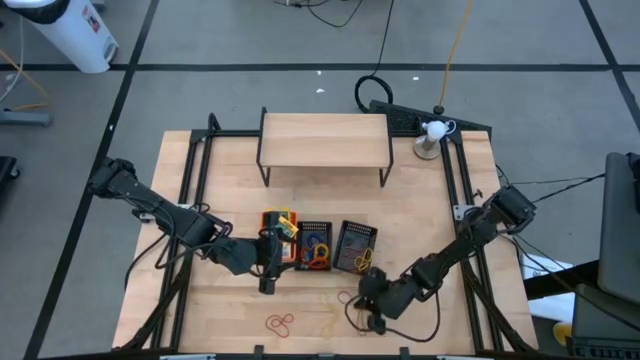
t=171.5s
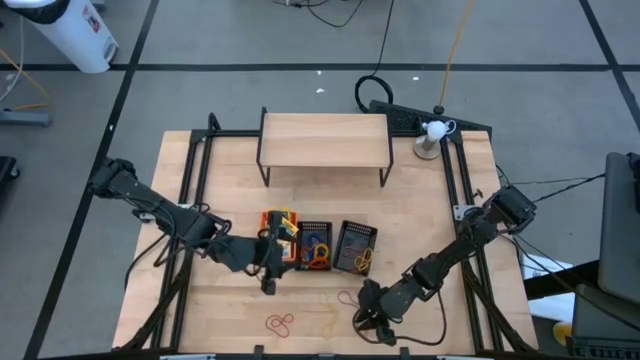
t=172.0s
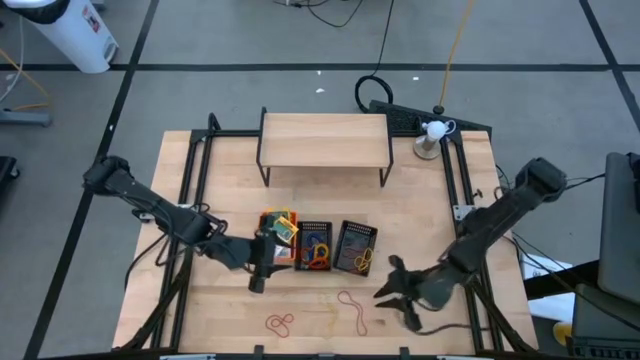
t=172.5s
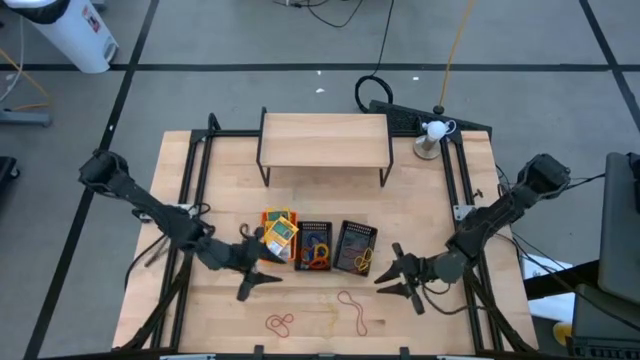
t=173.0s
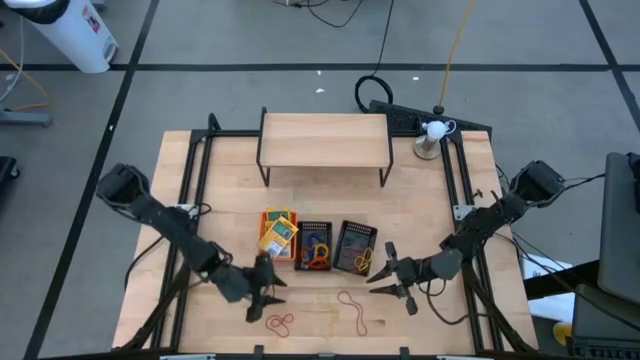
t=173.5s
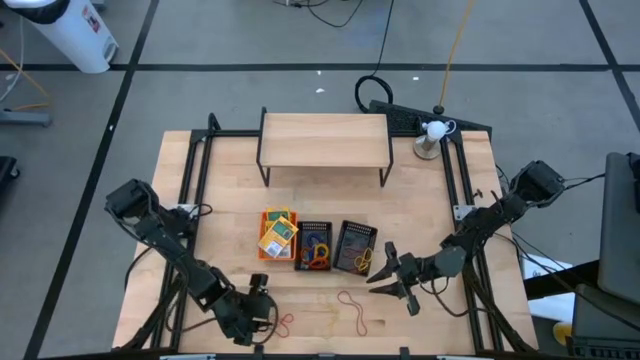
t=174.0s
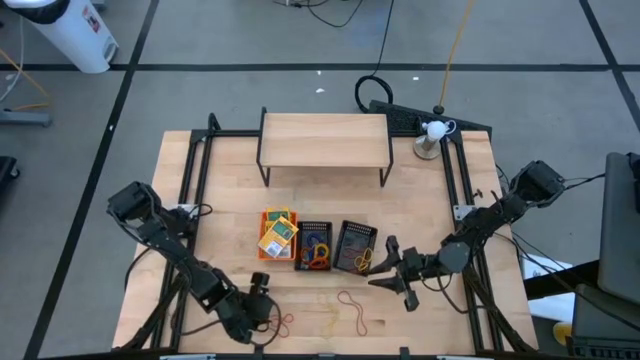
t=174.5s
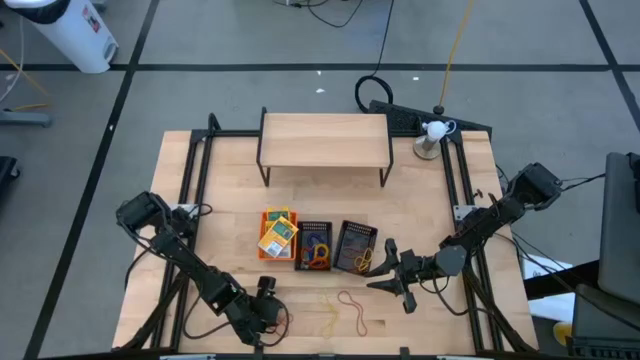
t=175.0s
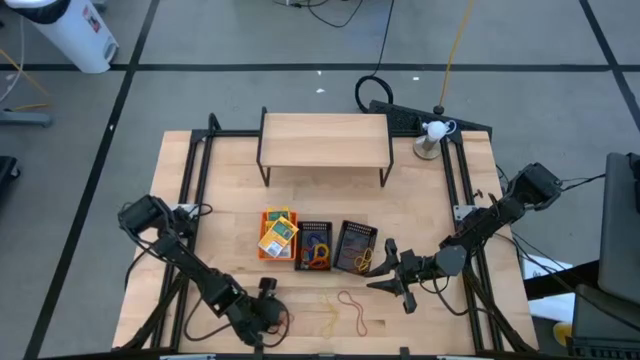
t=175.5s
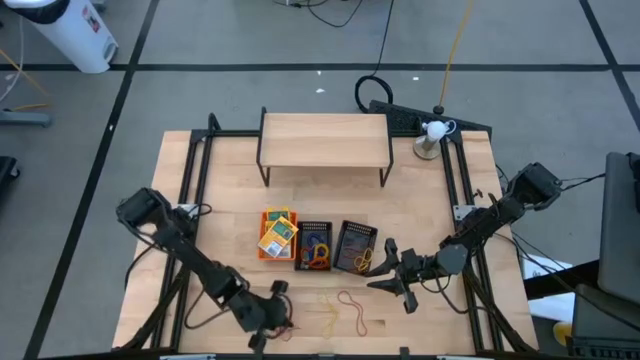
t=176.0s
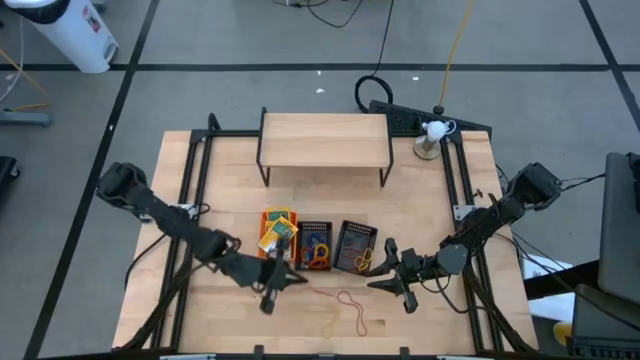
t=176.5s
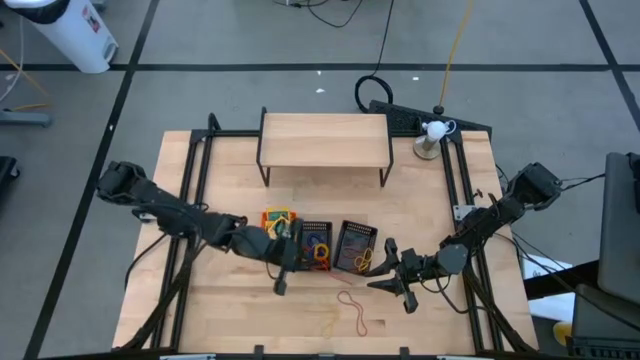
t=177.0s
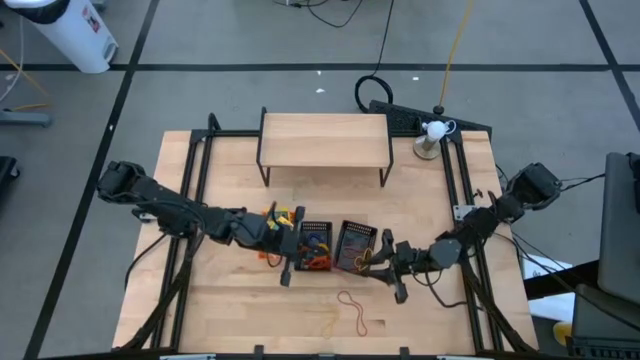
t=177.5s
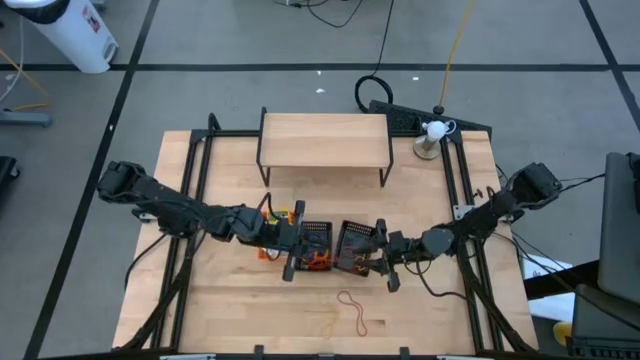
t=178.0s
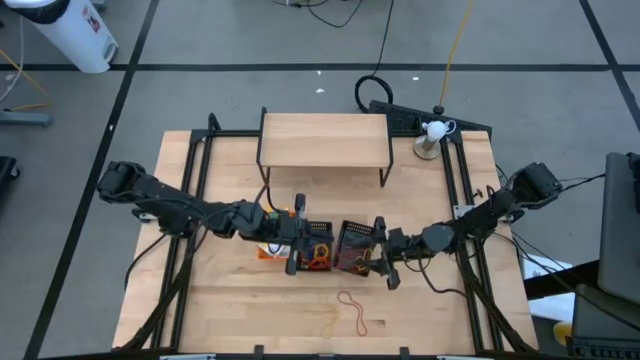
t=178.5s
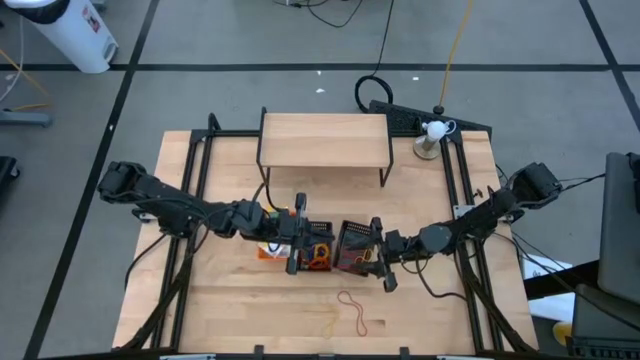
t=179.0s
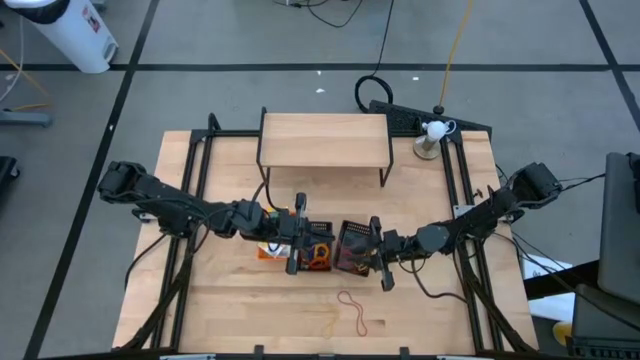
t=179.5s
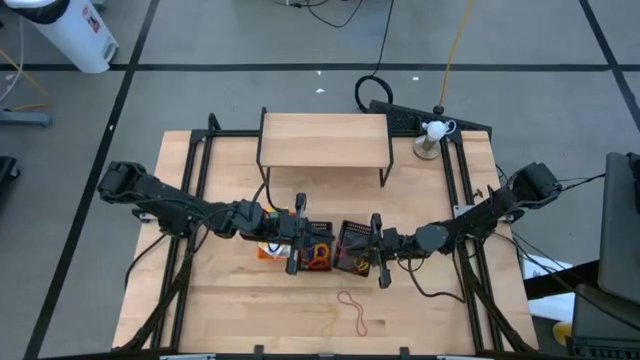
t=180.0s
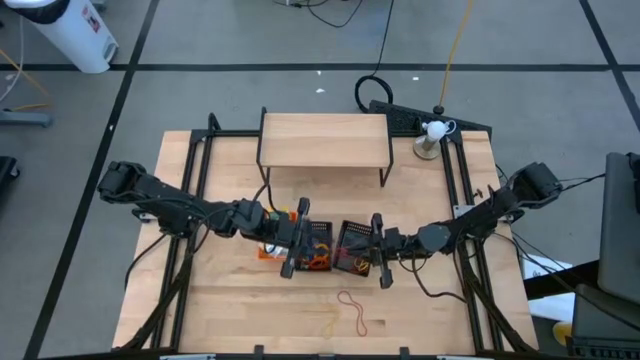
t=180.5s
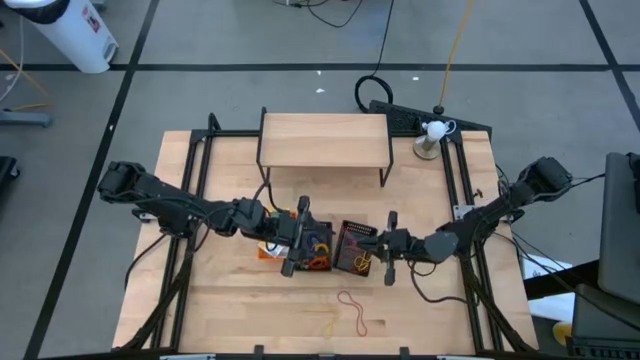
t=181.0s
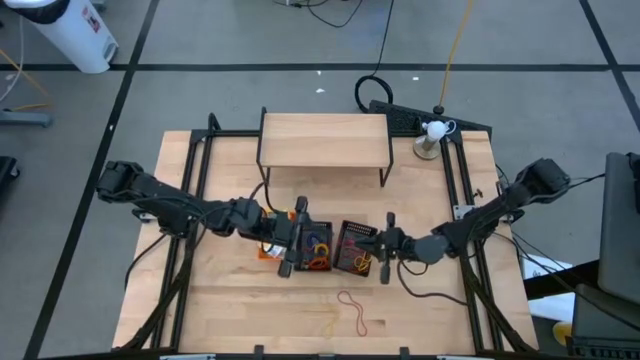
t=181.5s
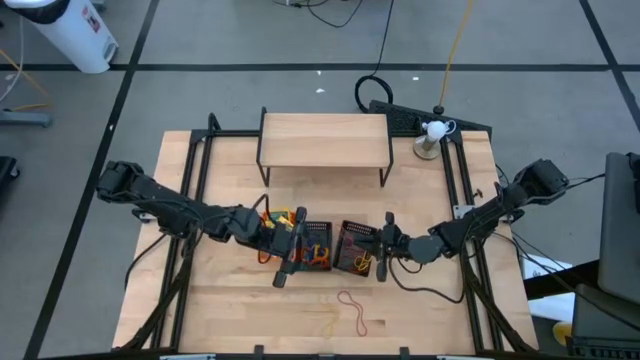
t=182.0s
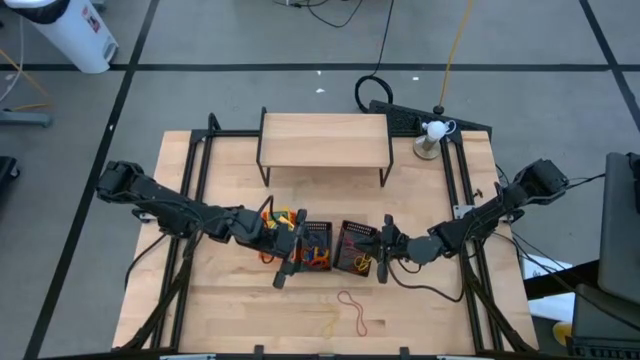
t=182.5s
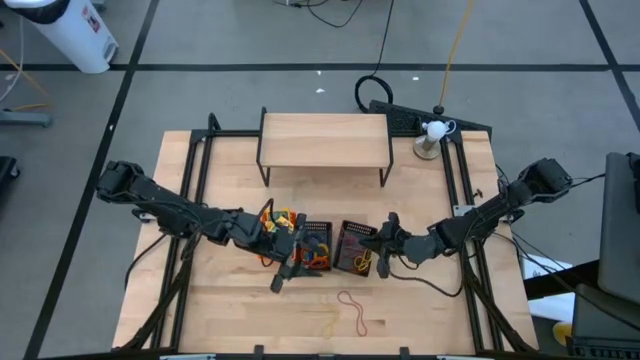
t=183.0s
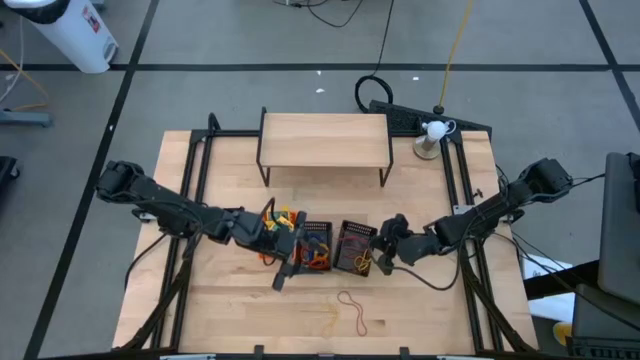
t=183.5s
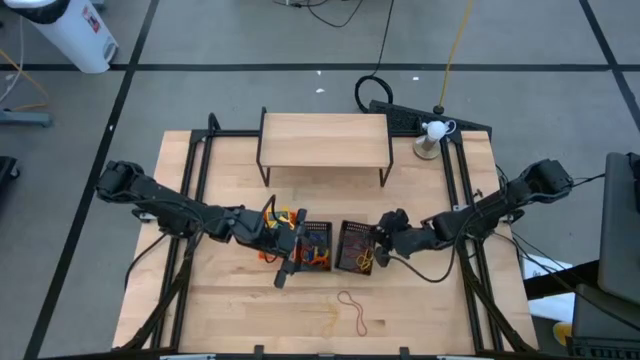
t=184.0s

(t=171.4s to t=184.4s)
Task: Pick & Place Office Desk Supplies
Put the red rubber band into the right black bin

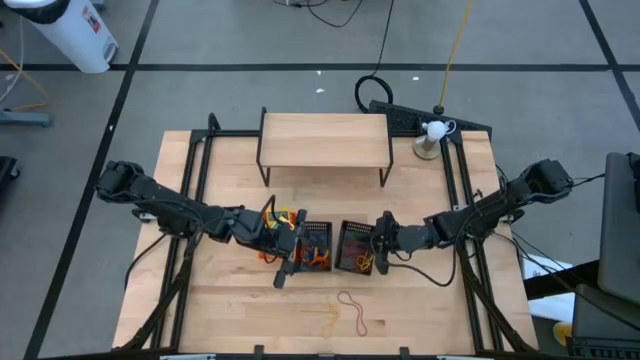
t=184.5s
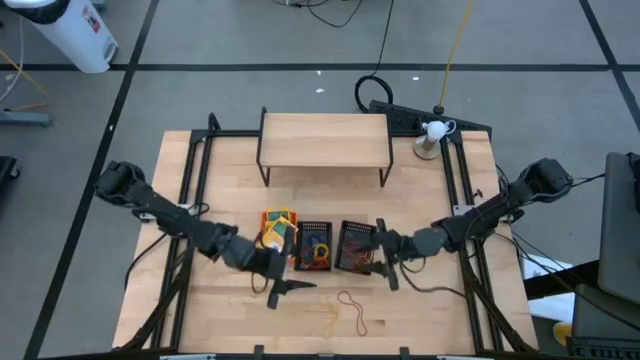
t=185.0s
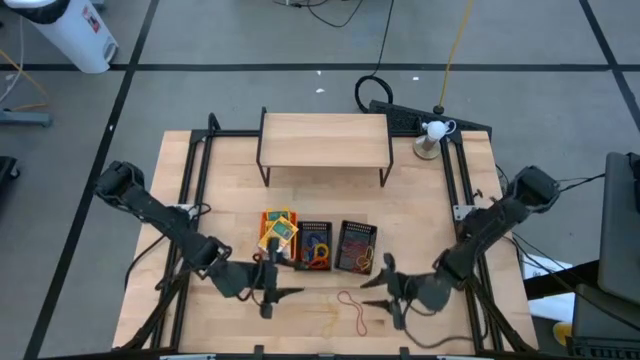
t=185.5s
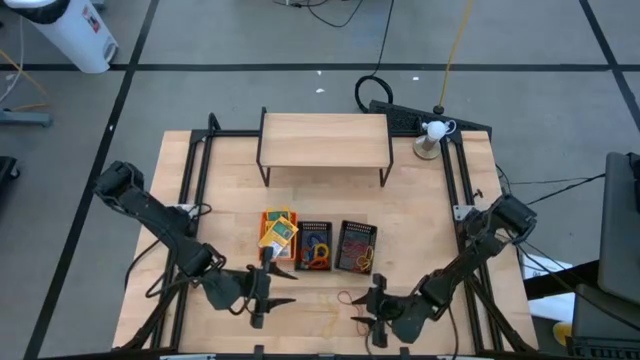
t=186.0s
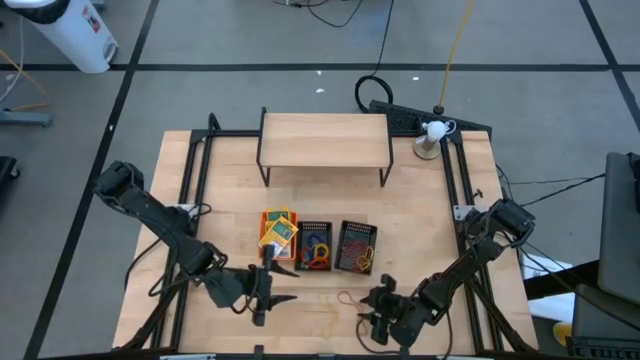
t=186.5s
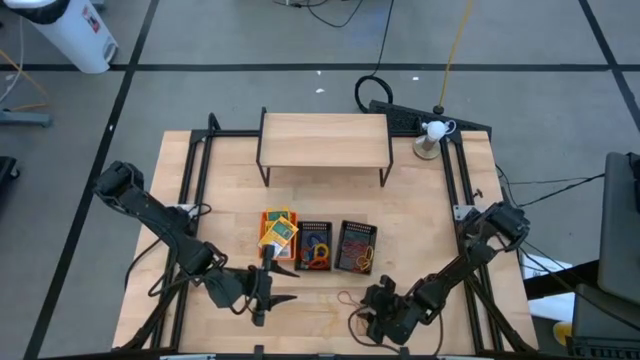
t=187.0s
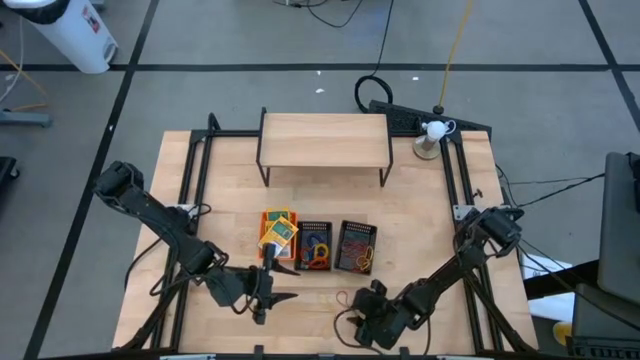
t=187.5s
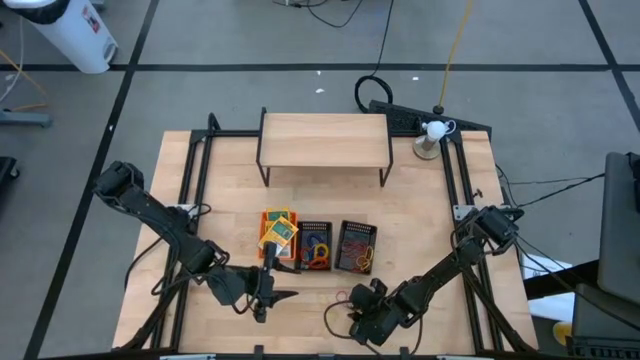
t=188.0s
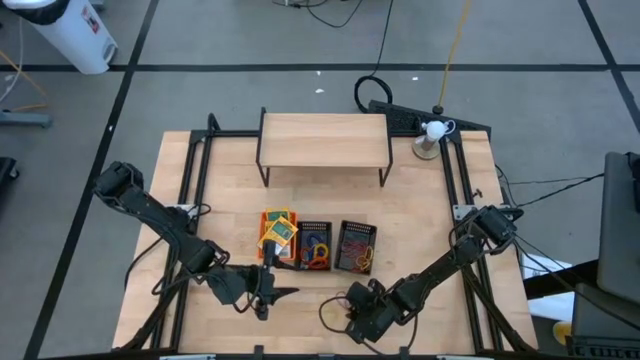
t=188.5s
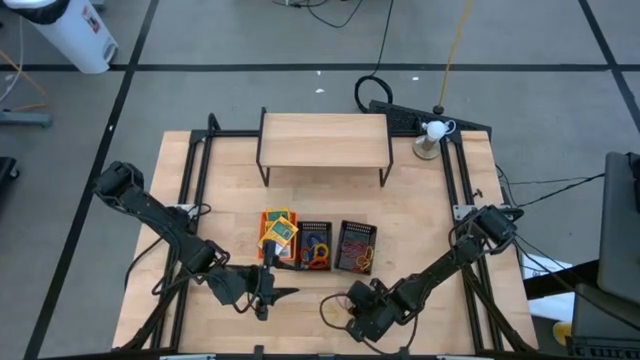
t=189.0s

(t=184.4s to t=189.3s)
Put the red rubber band into the right black bin

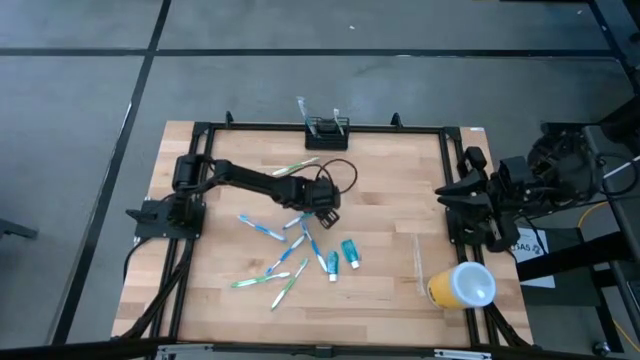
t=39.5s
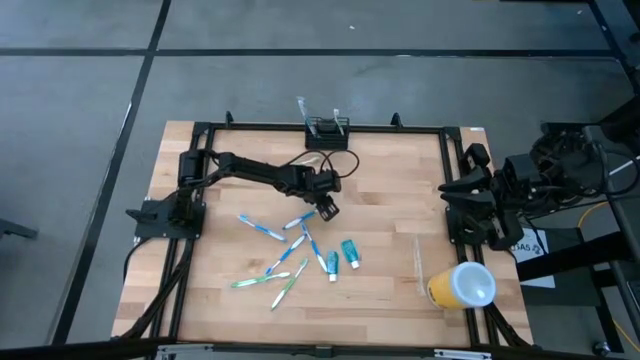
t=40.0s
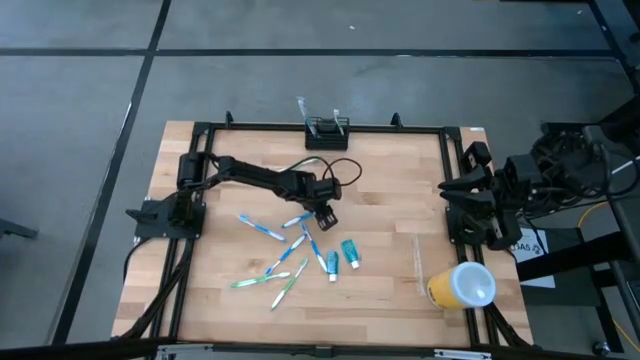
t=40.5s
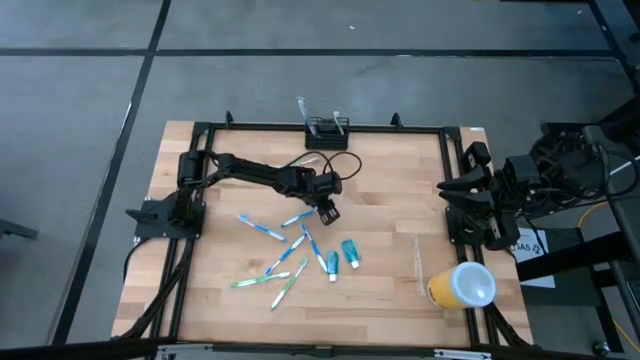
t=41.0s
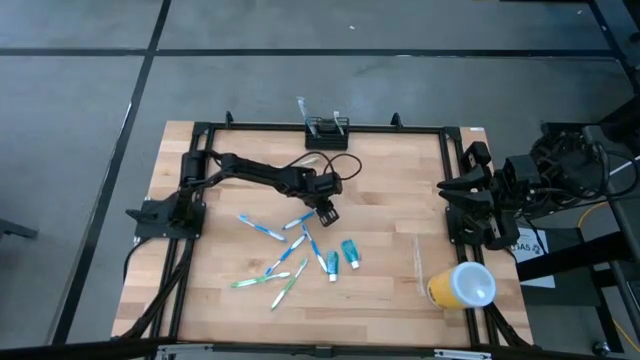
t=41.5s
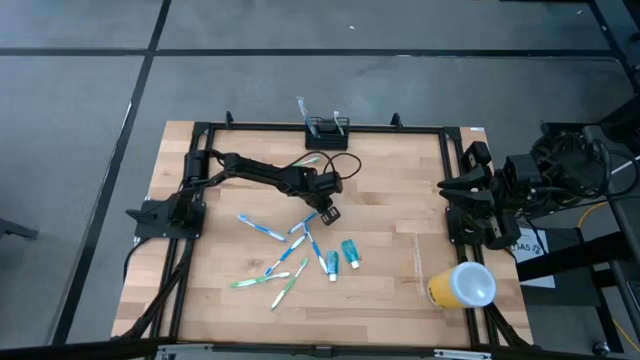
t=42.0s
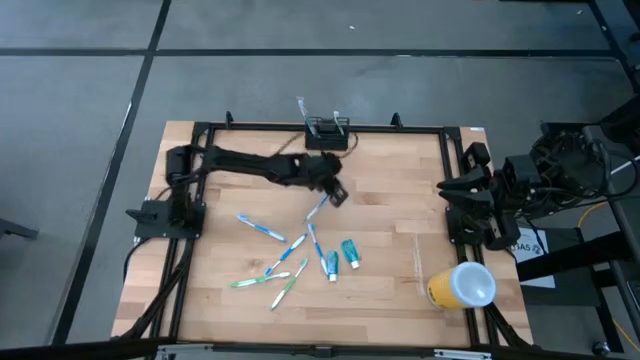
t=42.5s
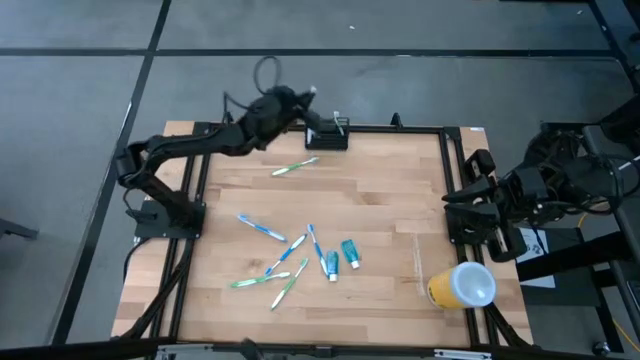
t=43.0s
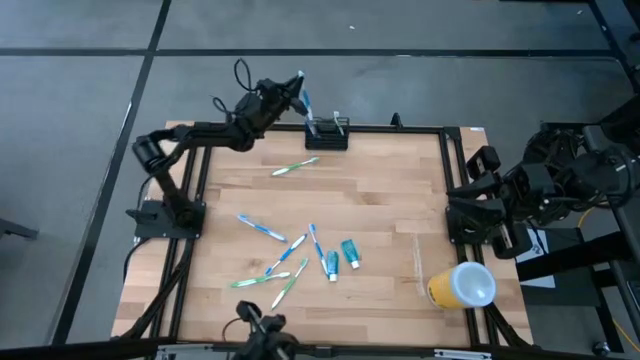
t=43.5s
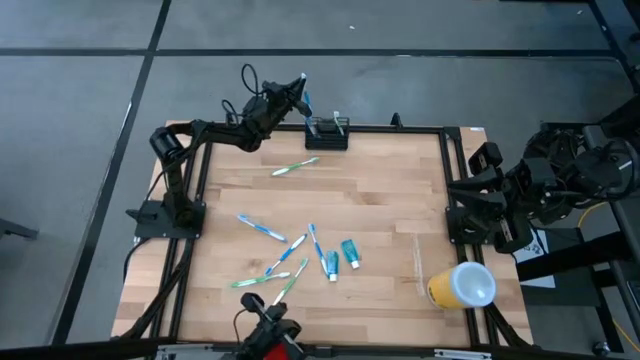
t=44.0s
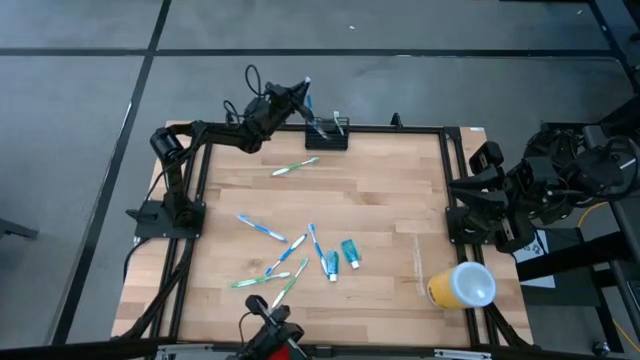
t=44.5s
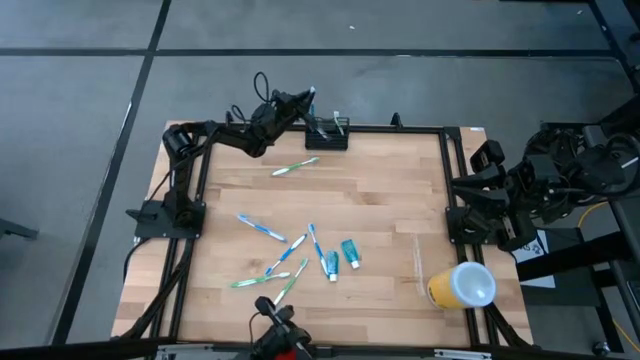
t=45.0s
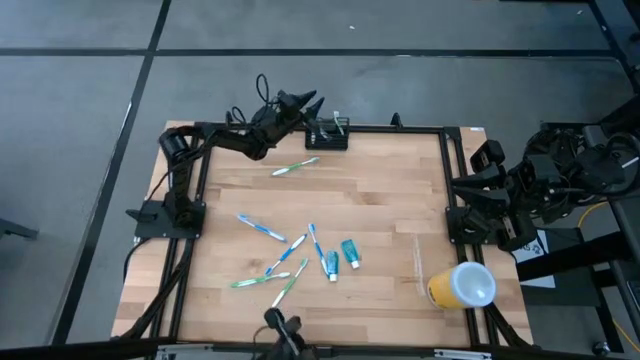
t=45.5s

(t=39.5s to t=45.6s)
Task: Pick & Place toothbrushing station
Put the blue toothbrush into the wire organizer
